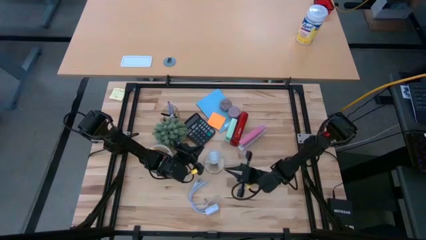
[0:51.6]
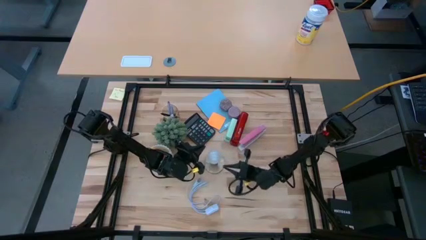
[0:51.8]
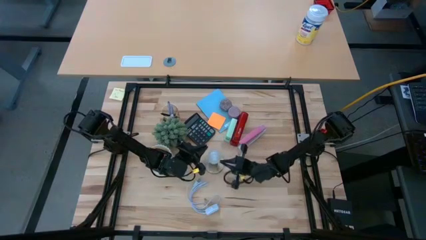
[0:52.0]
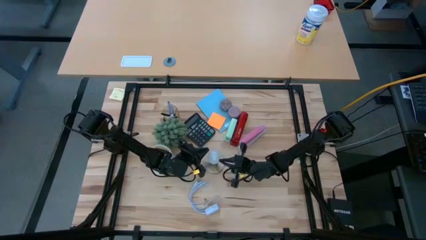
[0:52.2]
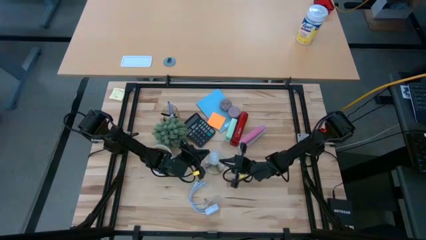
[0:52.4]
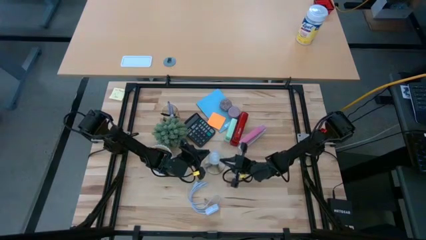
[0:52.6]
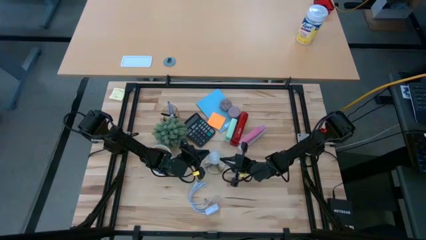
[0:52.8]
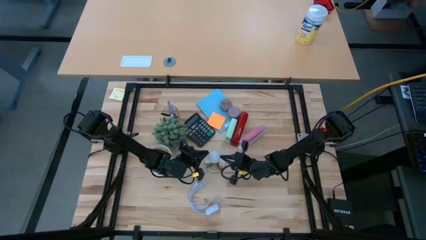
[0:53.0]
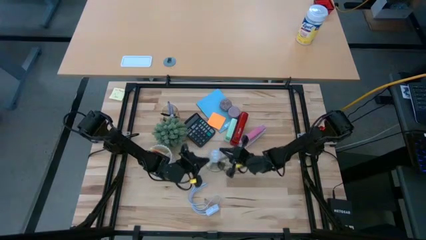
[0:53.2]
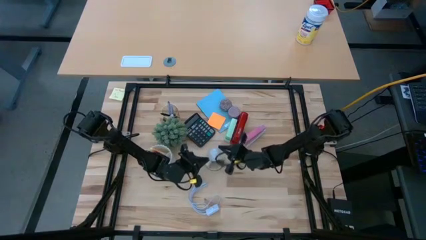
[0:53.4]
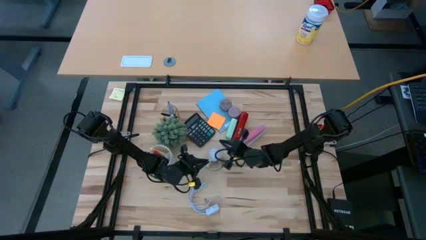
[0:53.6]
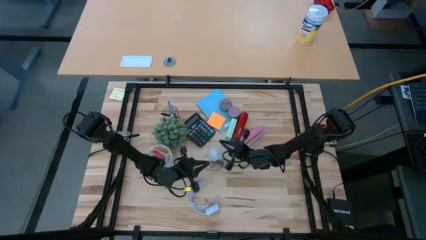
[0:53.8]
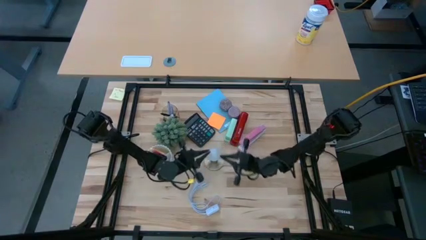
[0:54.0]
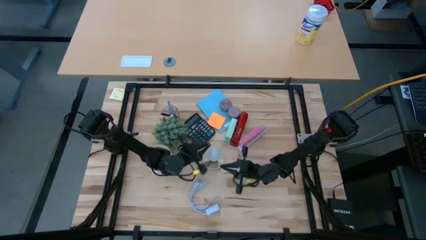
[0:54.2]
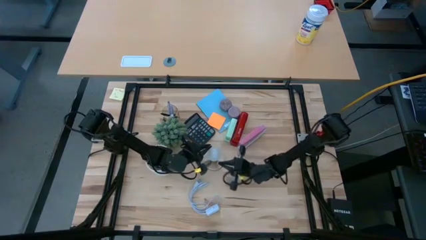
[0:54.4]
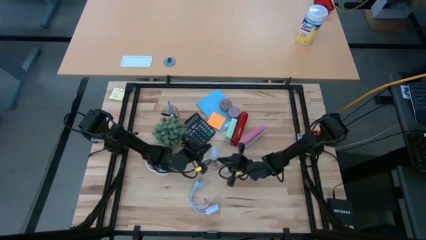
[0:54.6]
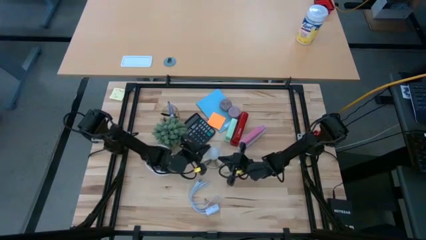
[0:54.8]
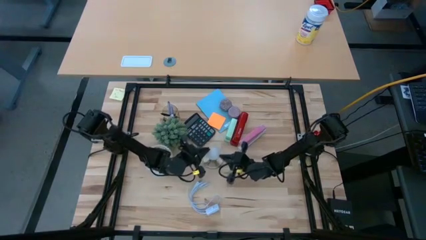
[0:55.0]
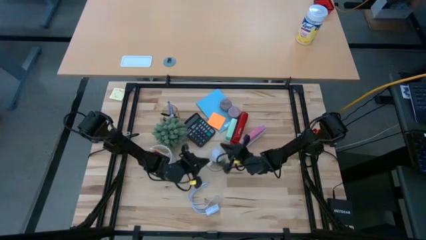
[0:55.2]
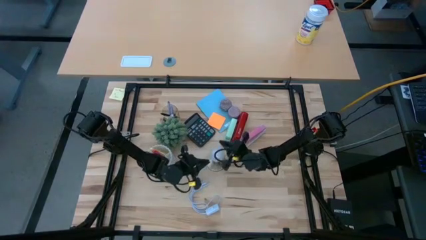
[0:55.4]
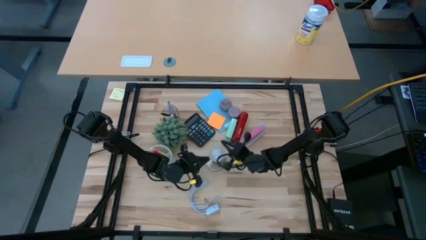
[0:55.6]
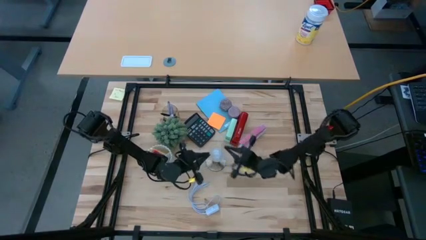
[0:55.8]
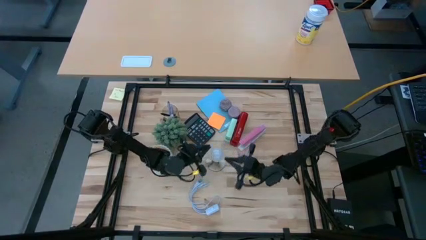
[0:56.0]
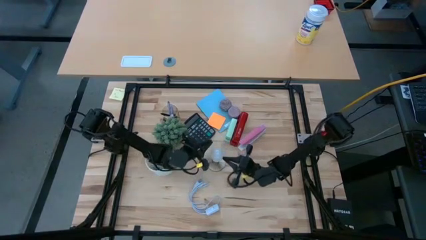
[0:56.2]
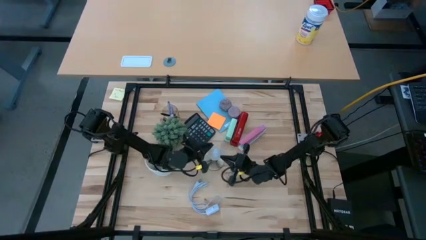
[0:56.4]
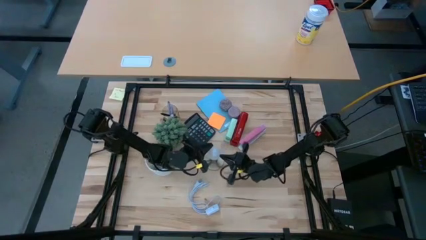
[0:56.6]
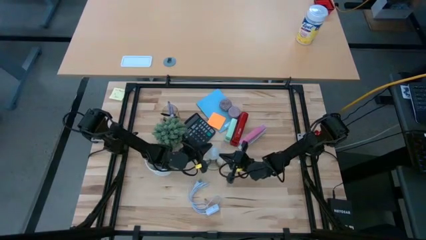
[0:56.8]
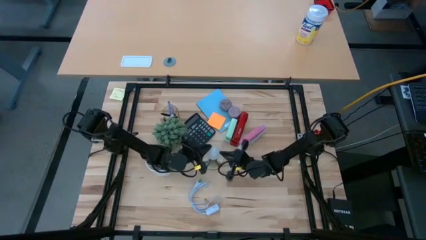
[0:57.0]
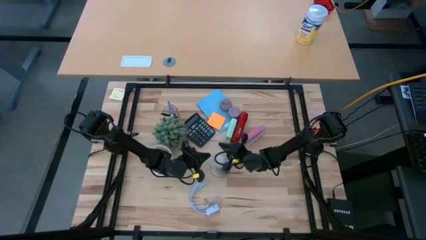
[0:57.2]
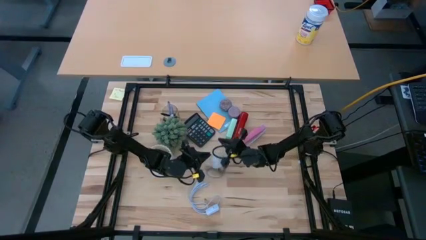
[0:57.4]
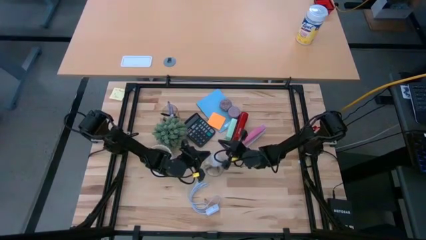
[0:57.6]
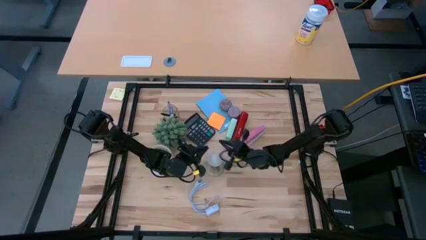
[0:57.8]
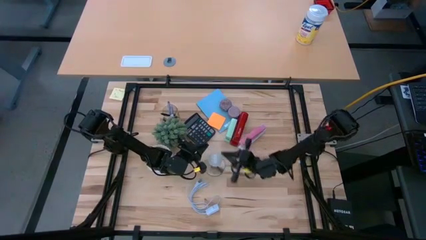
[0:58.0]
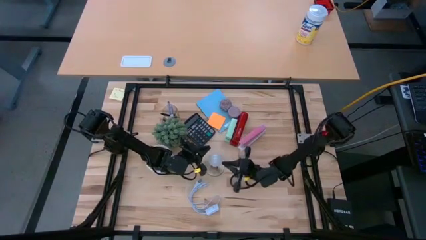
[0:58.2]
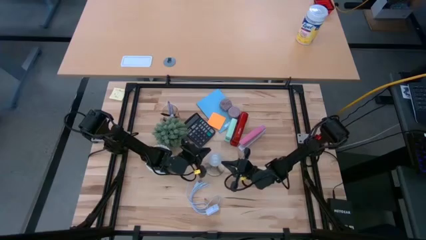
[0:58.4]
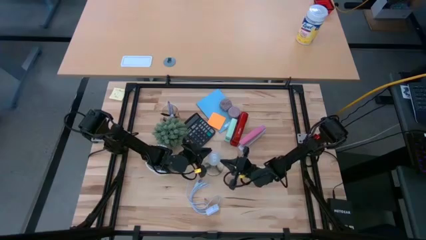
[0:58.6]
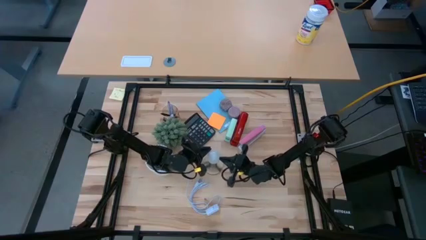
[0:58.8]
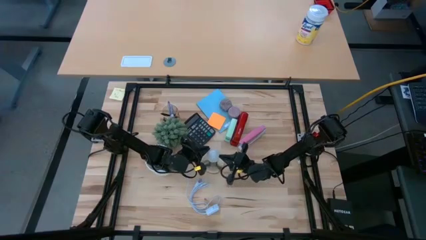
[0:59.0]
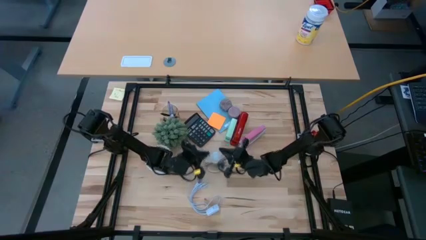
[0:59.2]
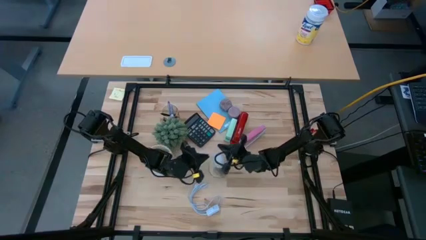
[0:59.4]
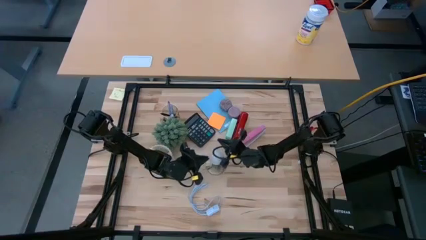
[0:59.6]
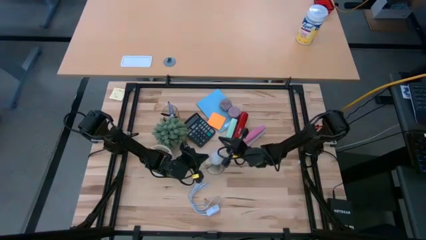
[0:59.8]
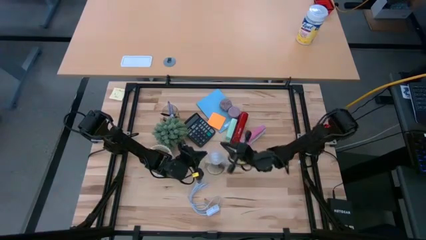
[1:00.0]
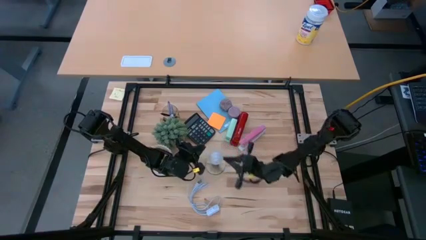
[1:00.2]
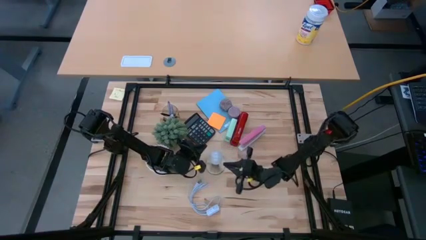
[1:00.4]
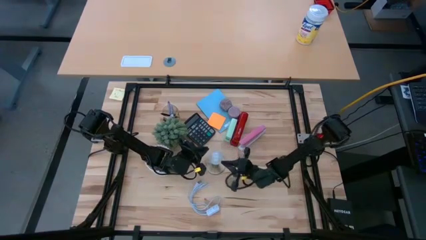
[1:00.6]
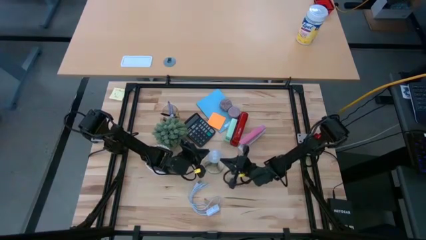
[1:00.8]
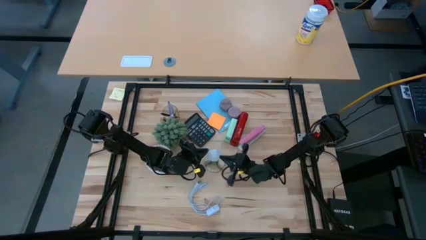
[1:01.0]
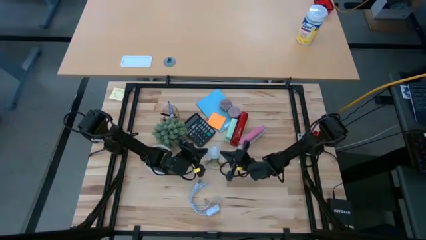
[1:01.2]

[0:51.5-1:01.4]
Task: Screw lightbulb
Remove the lightbulb from the lamp
